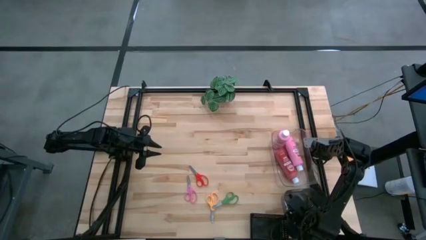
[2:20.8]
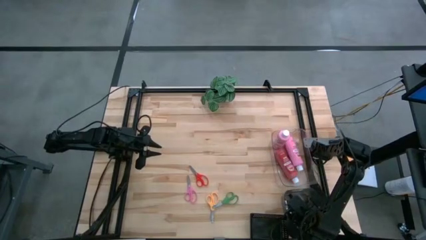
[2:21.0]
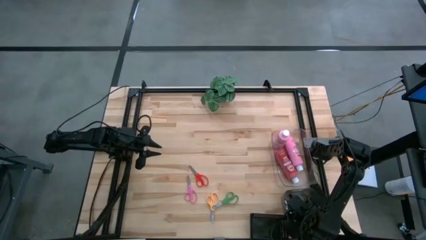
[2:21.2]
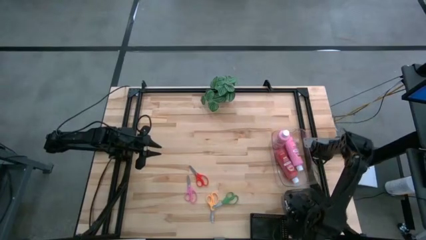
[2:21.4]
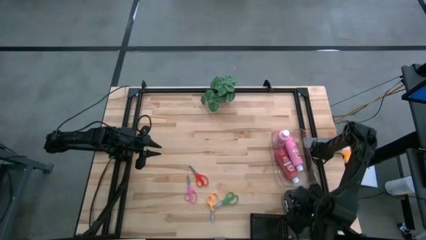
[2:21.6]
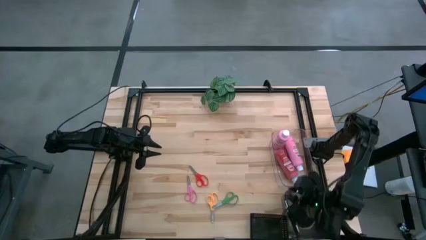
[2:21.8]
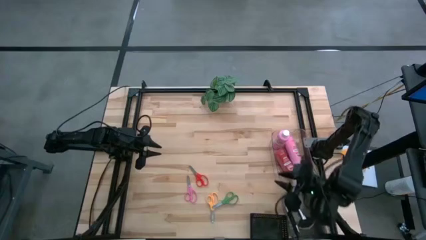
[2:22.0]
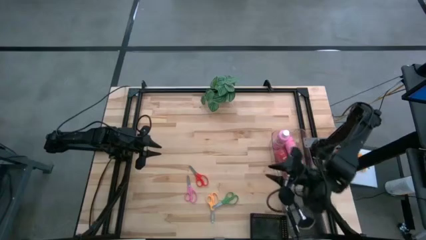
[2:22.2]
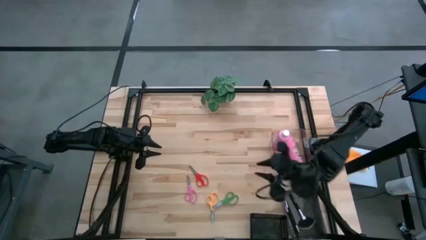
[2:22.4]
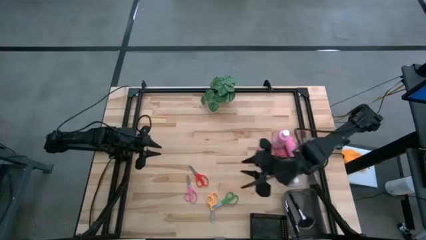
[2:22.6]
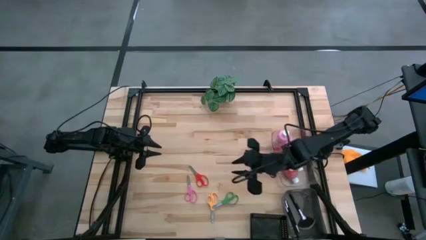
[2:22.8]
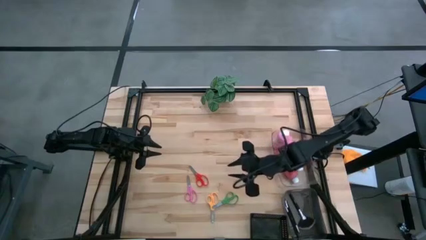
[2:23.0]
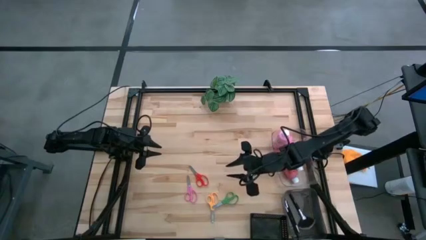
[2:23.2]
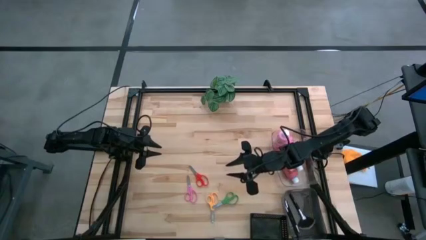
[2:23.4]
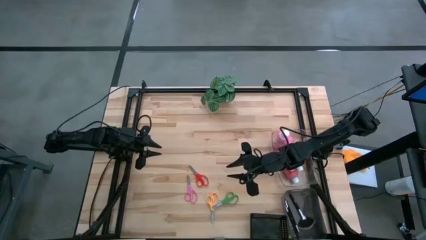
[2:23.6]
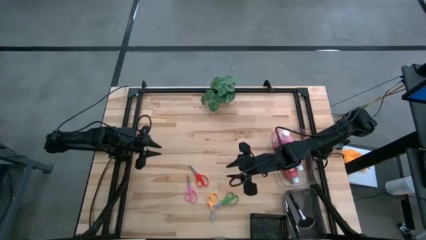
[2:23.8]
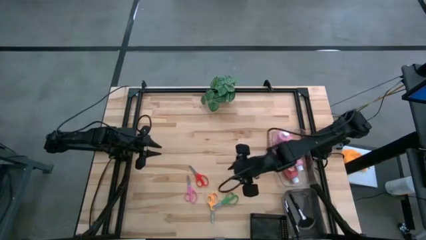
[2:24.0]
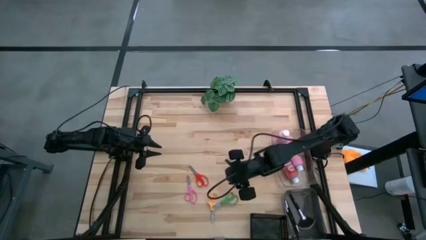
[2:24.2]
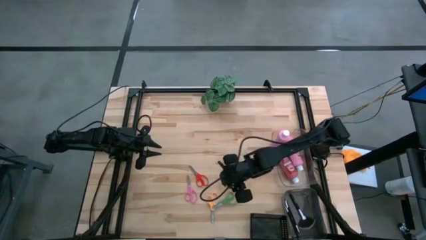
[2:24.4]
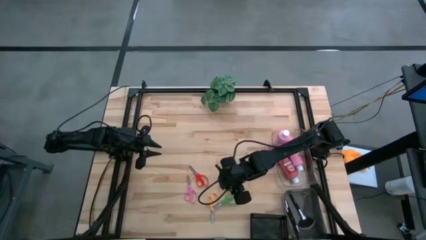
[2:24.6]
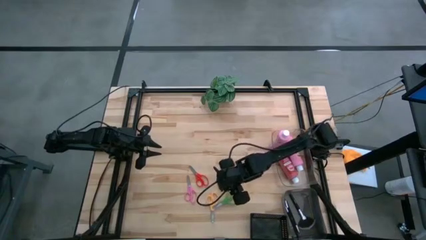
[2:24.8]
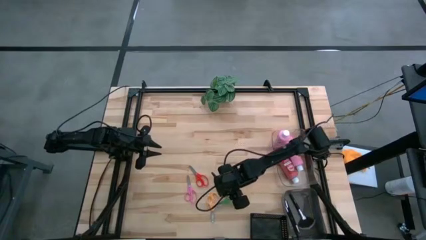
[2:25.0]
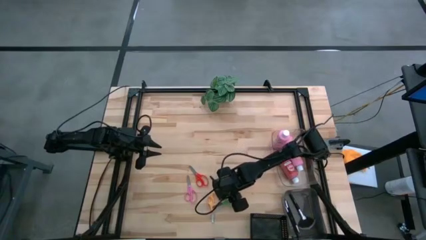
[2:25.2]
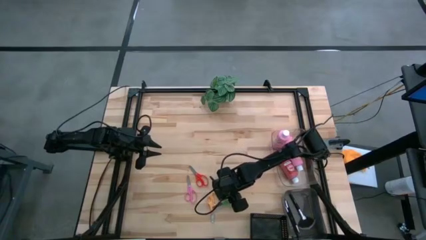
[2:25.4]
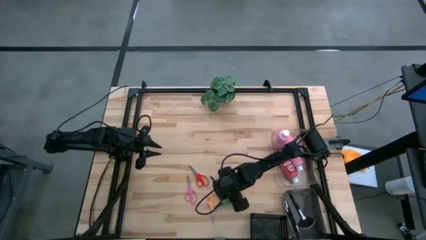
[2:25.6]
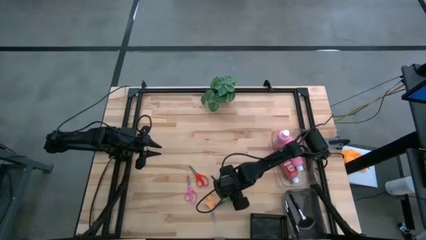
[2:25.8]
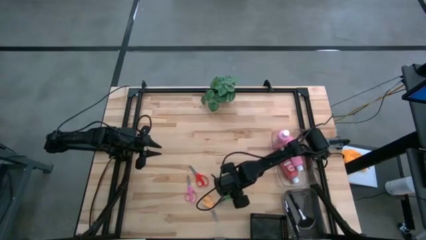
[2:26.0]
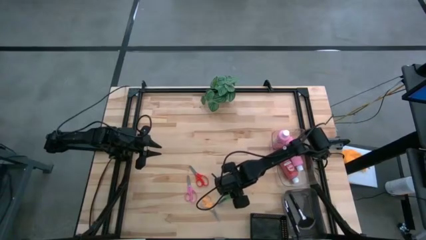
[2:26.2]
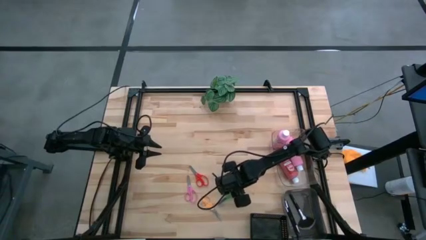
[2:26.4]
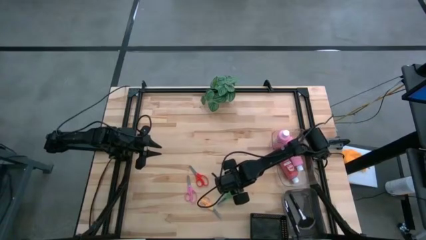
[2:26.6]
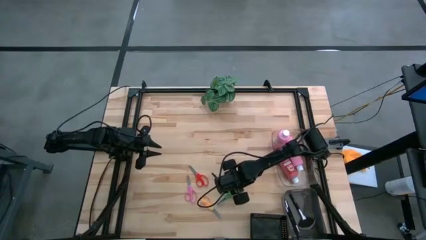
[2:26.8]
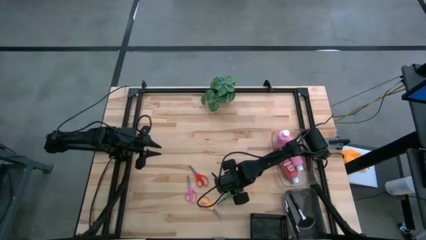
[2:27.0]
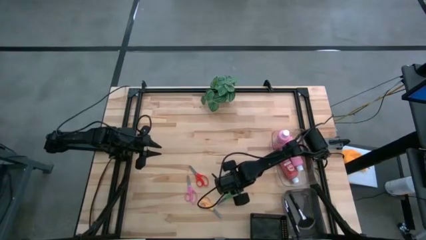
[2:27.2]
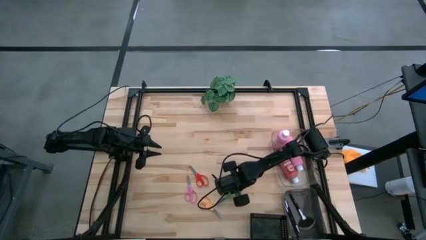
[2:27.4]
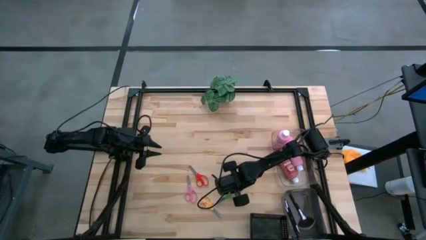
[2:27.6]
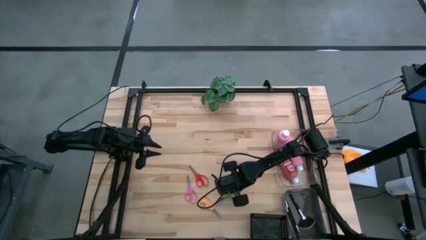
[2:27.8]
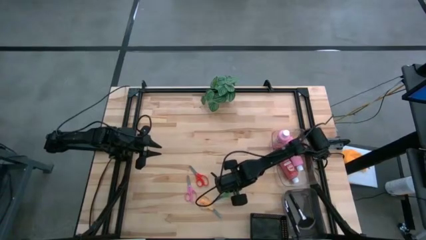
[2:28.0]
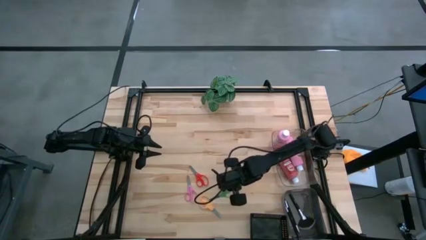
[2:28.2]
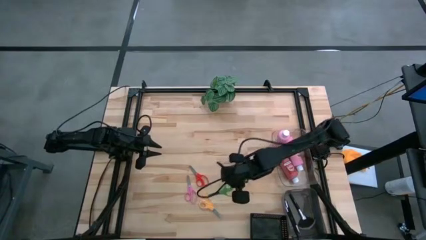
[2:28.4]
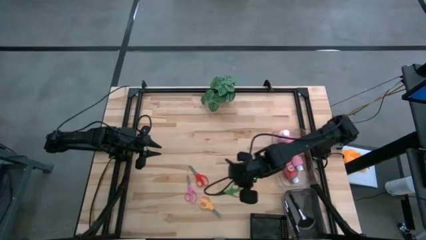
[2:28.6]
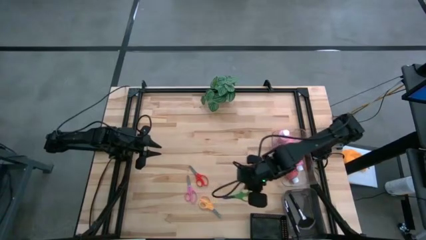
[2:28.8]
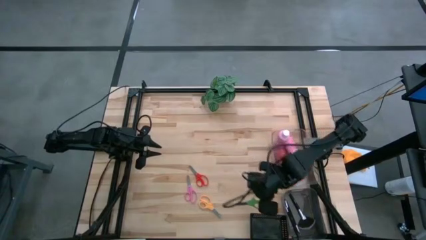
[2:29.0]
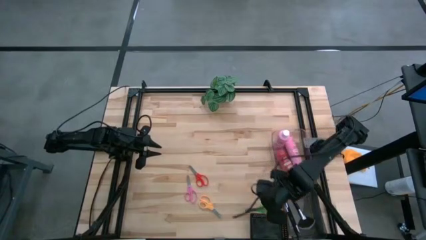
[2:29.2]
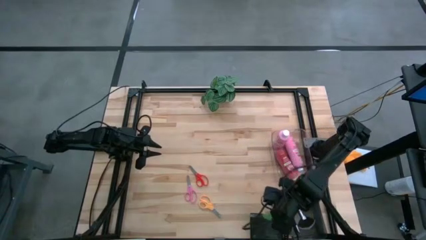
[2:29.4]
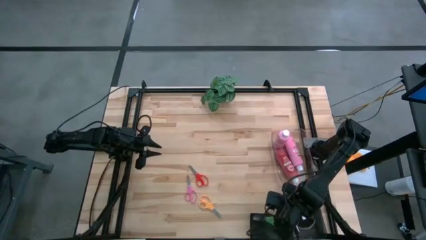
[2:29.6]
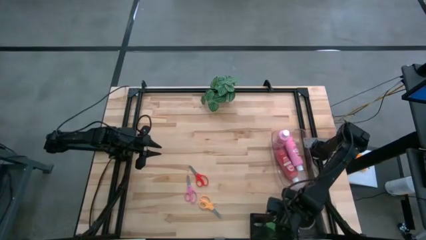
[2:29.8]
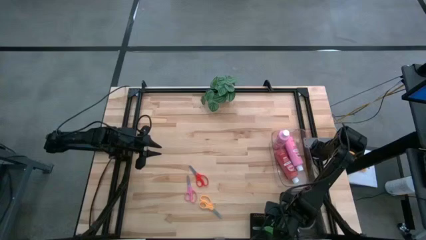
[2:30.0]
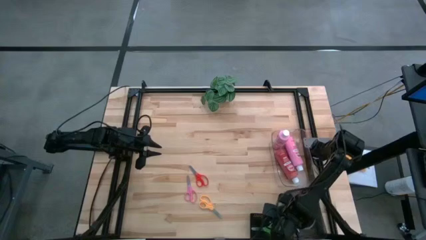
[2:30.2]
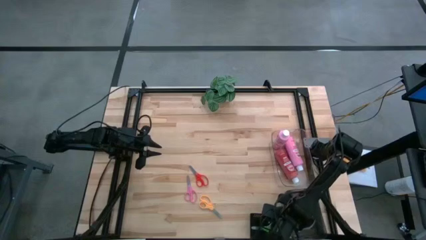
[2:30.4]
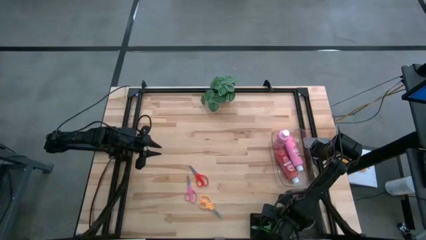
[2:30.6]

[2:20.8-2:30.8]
Task: Pick & Place Paint Supplies
Put the green scissors into the black bin

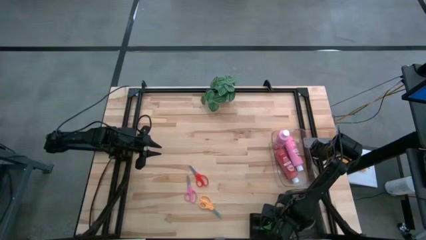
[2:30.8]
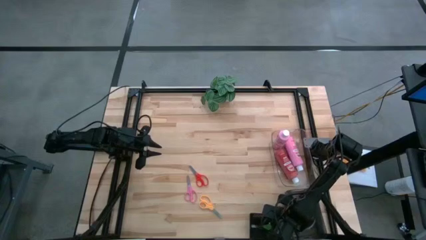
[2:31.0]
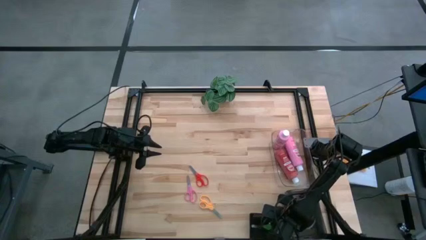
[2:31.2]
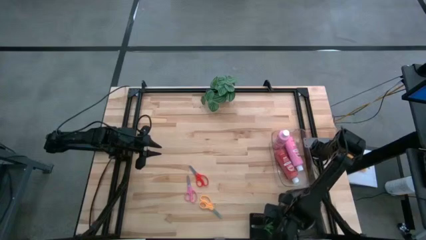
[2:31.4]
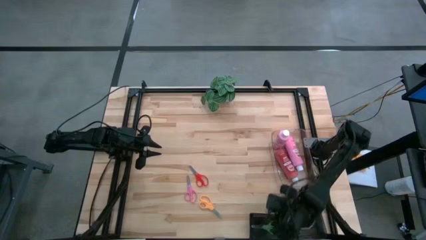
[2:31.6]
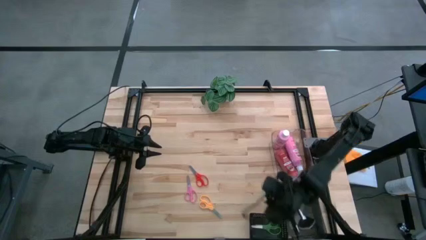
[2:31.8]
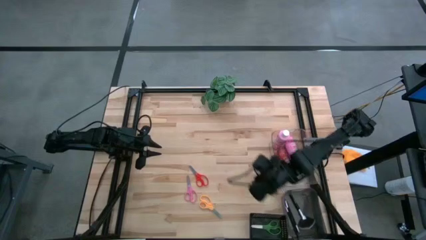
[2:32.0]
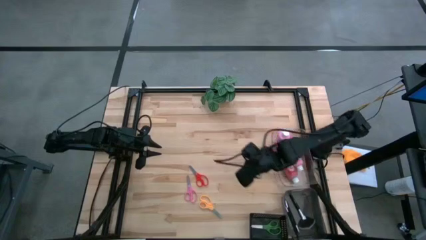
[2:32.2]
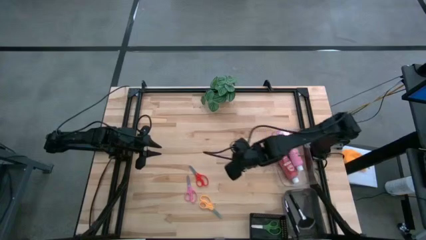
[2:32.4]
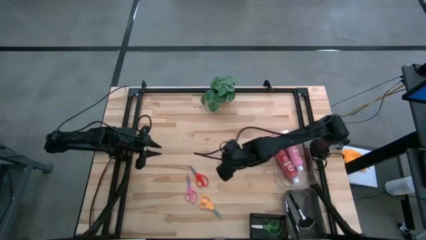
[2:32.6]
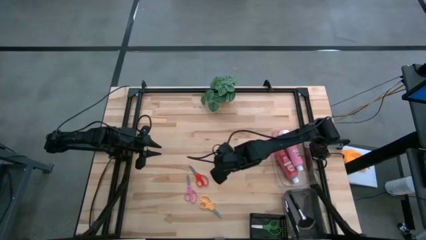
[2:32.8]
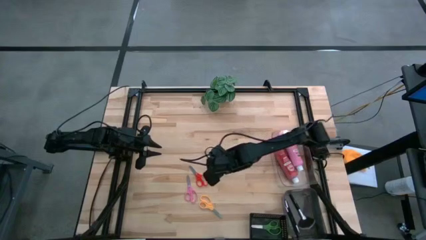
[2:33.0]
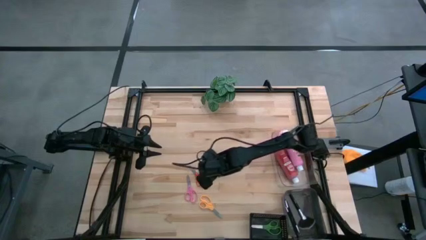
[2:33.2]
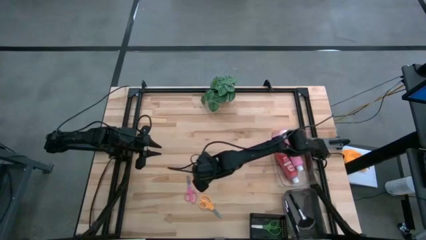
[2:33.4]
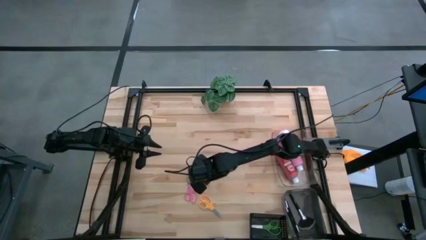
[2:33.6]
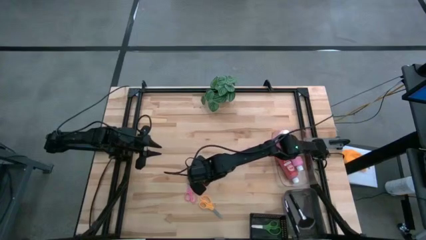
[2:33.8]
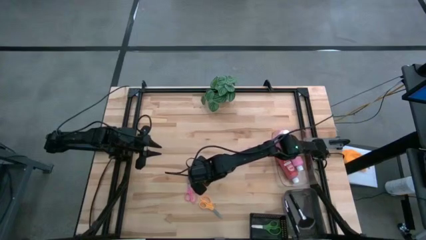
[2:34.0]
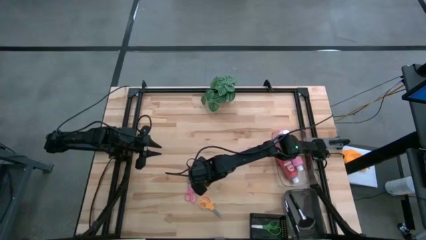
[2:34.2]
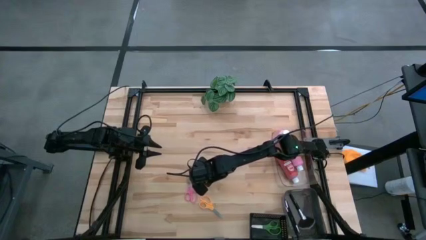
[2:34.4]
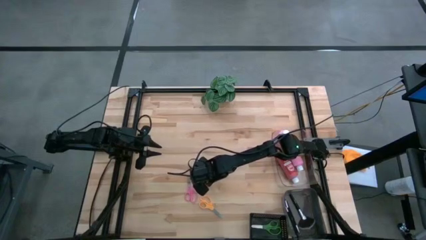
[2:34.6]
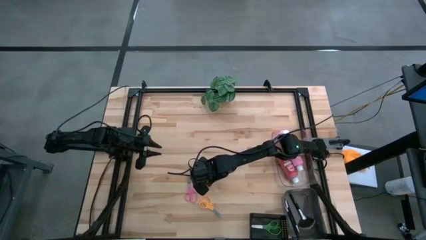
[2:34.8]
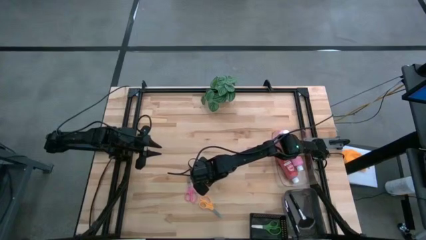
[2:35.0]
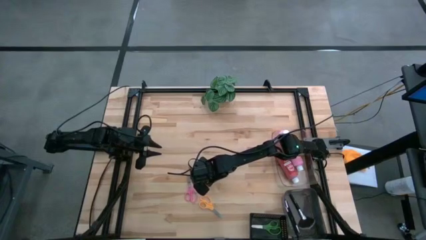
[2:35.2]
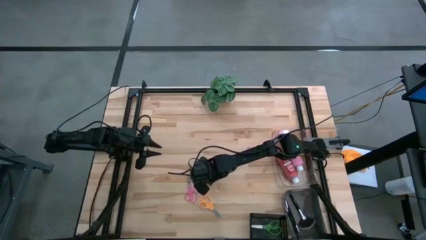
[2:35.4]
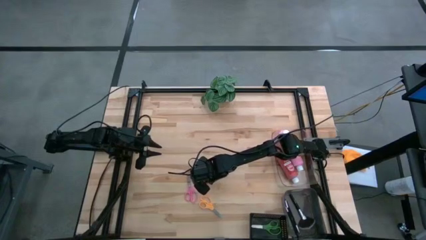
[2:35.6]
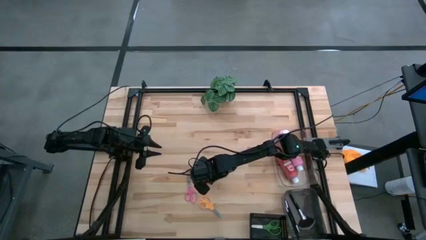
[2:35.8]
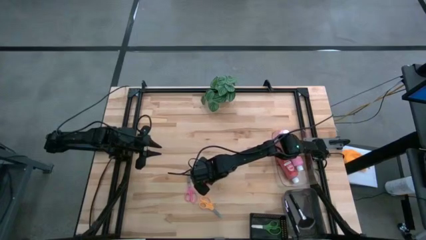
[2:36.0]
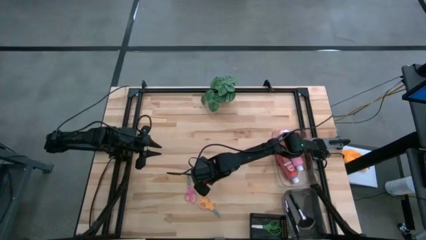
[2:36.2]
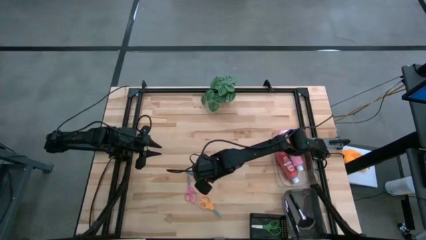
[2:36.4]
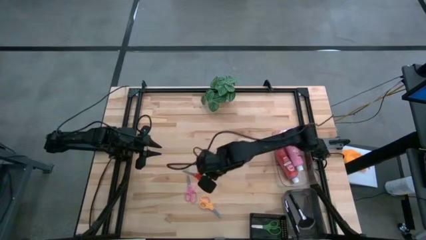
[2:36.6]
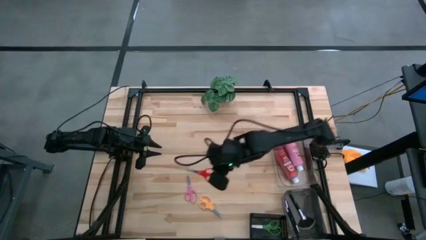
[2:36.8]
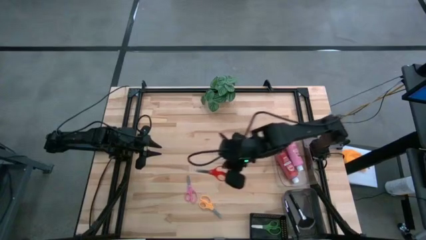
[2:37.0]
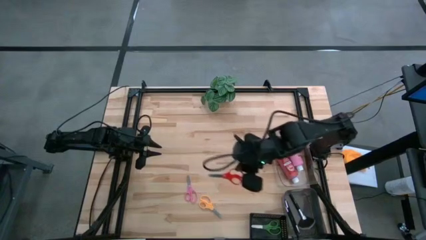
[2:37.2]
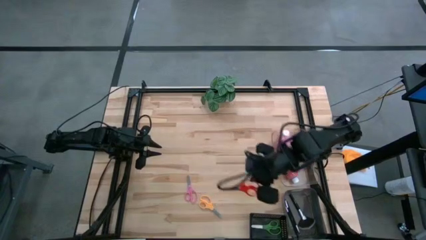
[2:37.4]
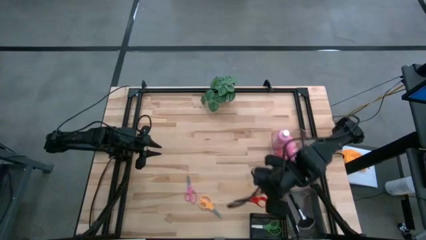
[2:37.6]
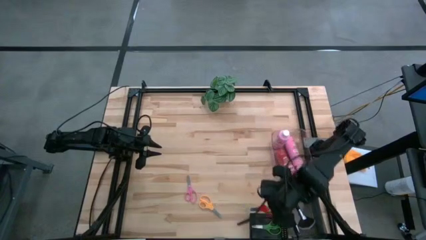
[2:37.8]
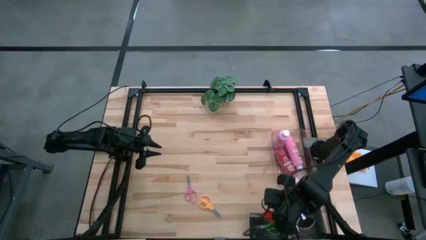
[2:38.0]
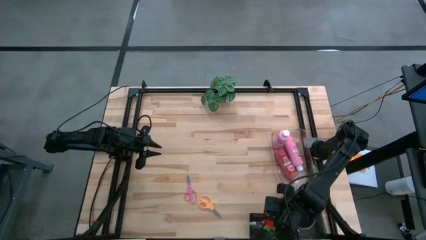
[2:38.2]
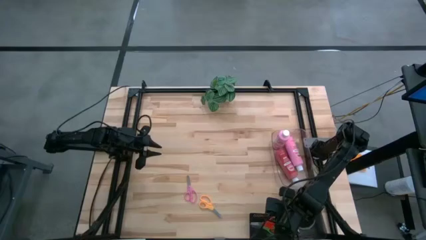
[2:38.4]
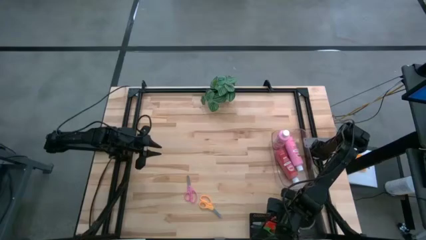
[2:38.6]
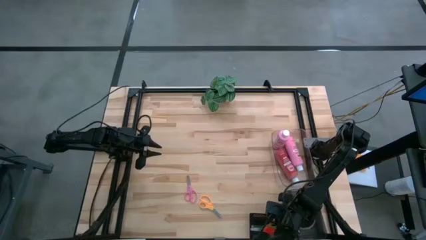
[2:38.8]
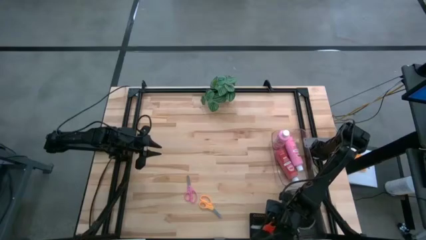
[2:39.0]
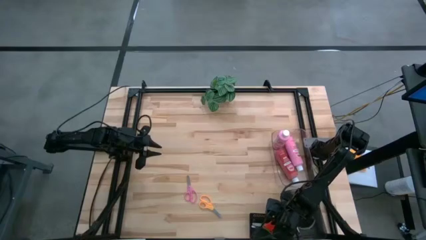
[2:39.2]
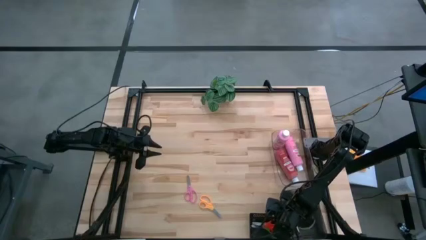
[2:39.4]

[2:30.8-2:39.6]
Put the red scissors into the black bin
